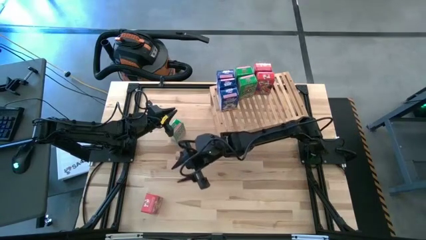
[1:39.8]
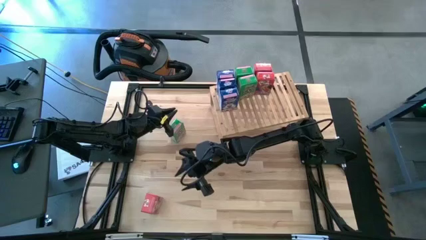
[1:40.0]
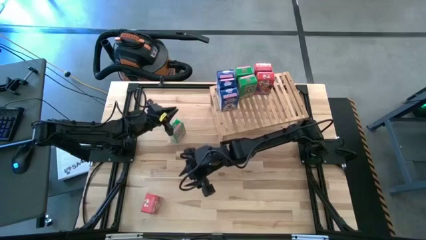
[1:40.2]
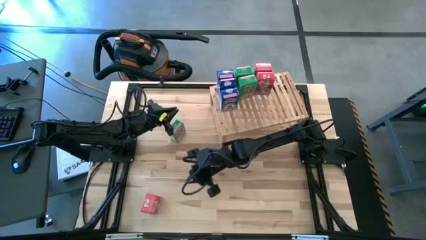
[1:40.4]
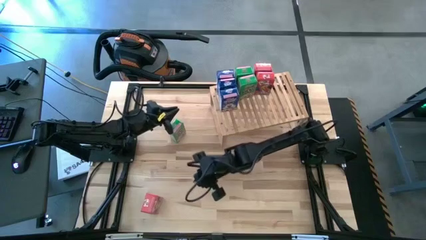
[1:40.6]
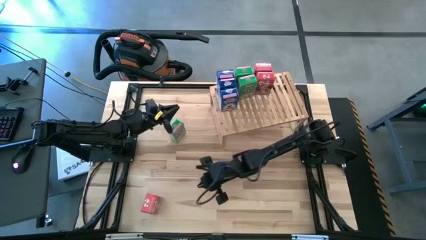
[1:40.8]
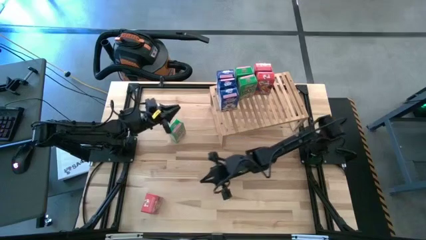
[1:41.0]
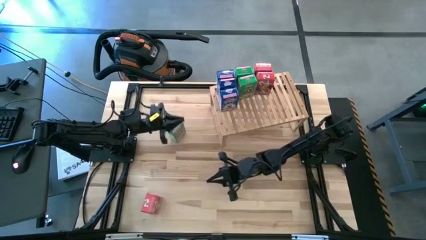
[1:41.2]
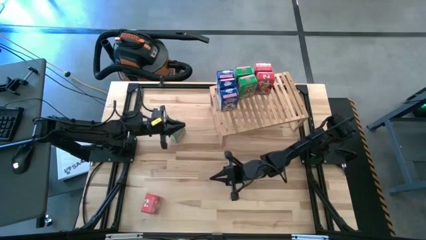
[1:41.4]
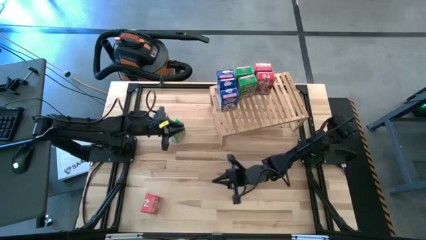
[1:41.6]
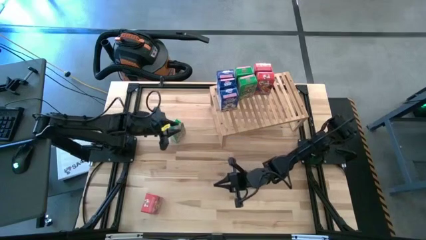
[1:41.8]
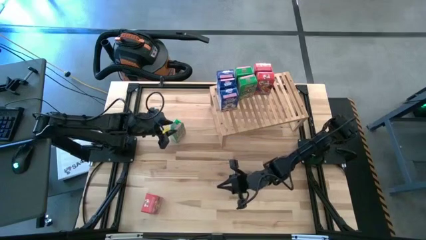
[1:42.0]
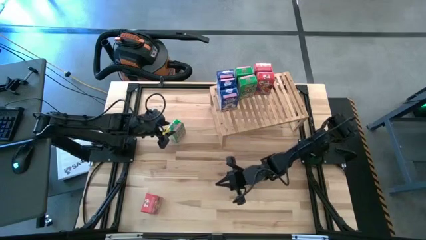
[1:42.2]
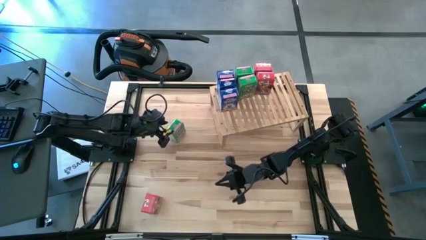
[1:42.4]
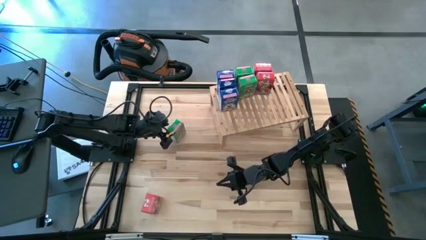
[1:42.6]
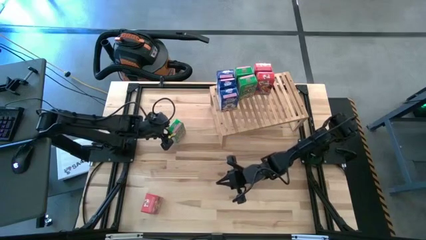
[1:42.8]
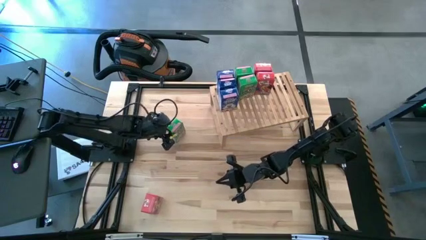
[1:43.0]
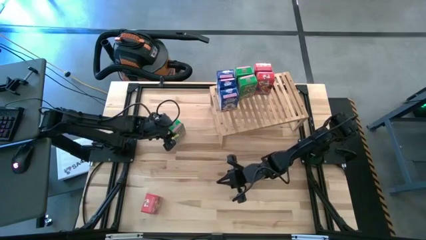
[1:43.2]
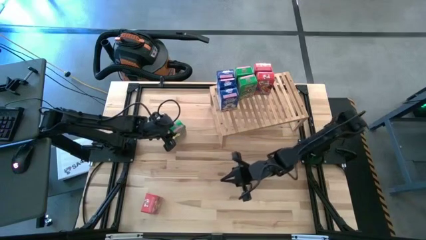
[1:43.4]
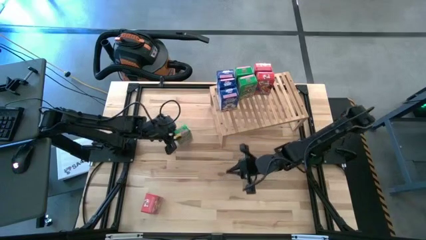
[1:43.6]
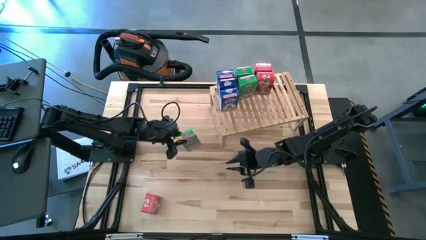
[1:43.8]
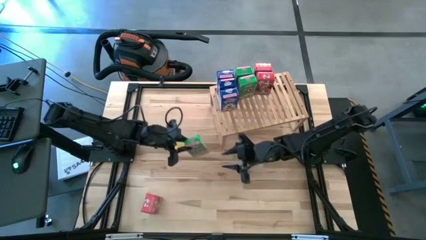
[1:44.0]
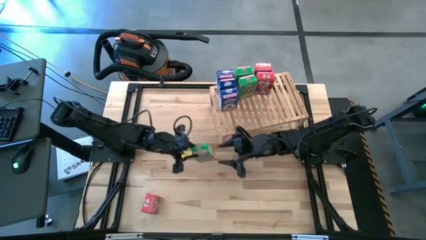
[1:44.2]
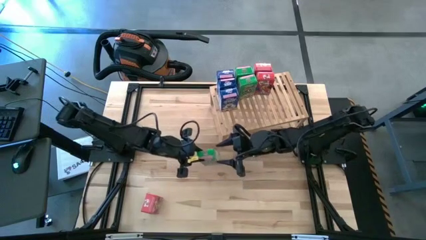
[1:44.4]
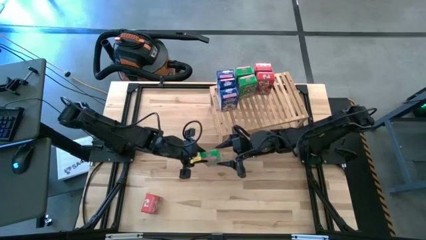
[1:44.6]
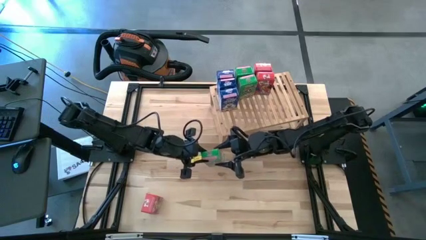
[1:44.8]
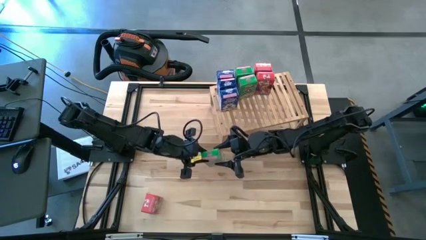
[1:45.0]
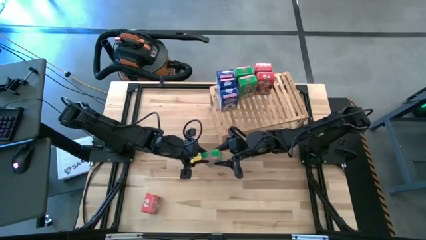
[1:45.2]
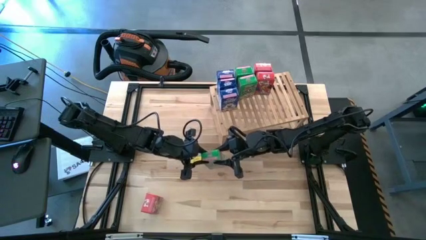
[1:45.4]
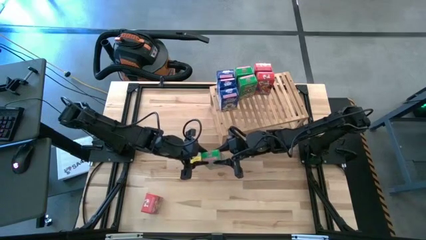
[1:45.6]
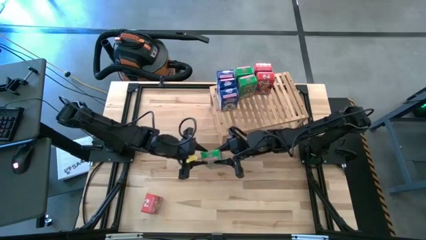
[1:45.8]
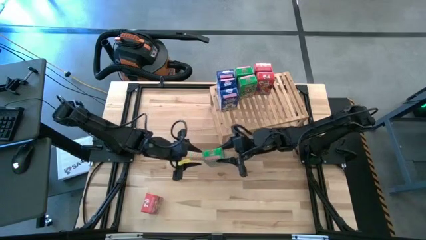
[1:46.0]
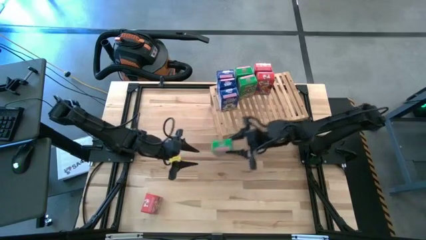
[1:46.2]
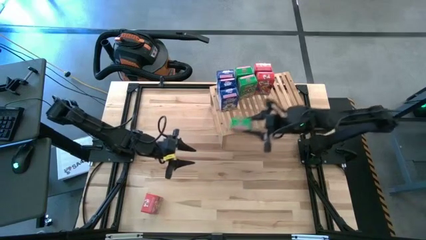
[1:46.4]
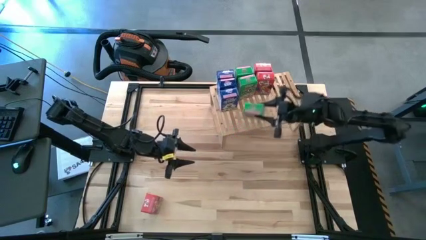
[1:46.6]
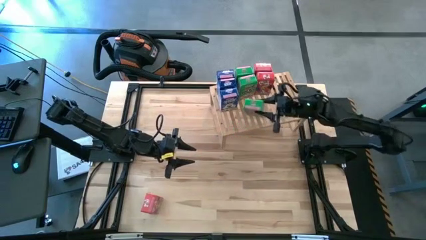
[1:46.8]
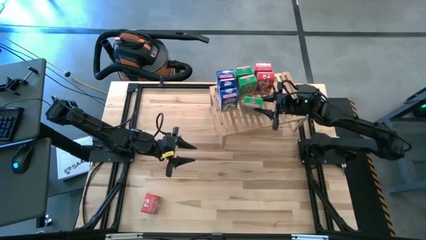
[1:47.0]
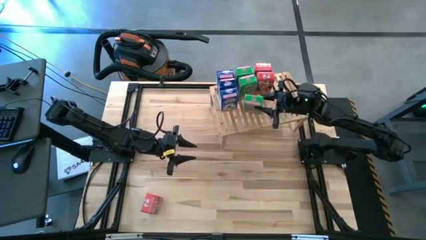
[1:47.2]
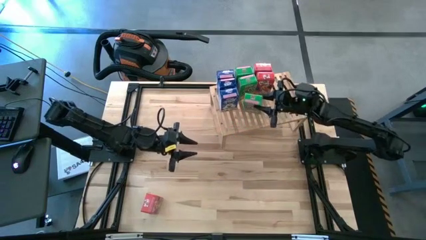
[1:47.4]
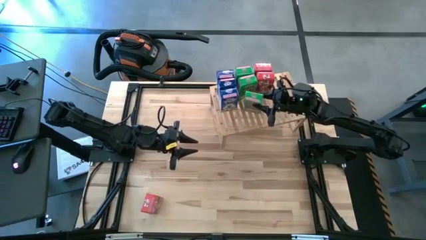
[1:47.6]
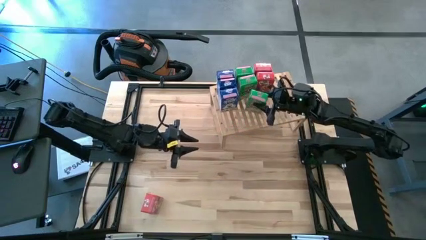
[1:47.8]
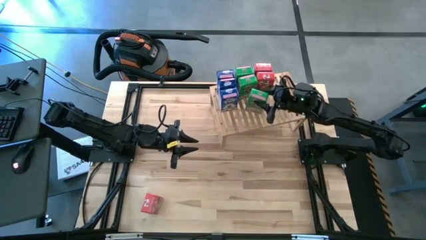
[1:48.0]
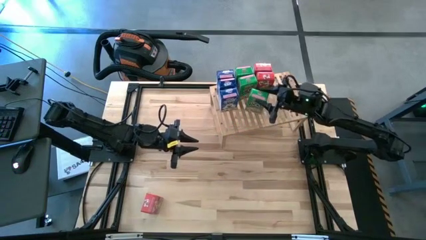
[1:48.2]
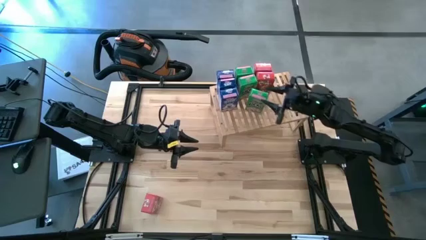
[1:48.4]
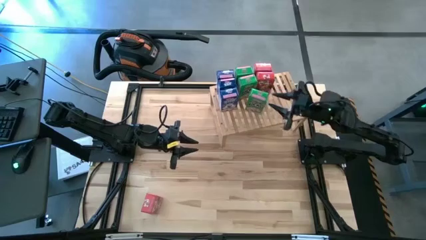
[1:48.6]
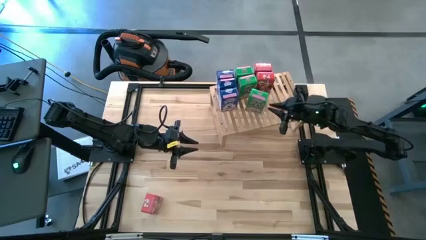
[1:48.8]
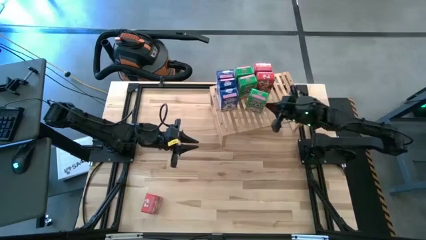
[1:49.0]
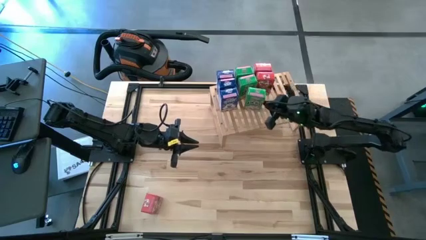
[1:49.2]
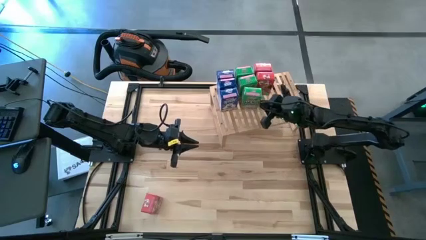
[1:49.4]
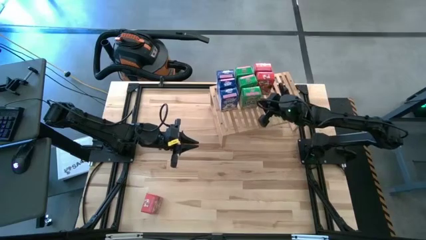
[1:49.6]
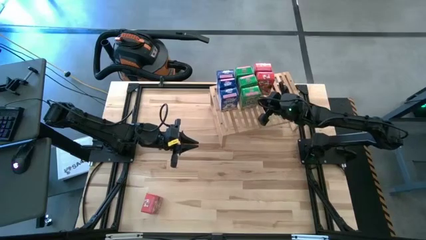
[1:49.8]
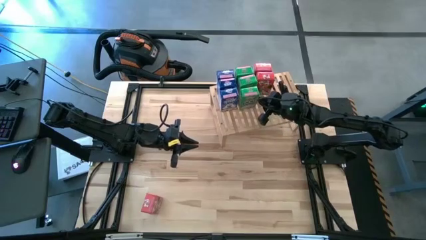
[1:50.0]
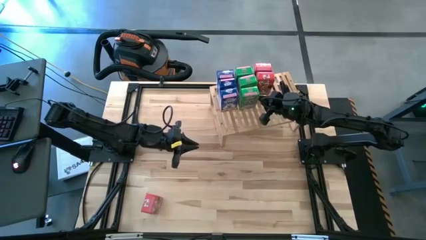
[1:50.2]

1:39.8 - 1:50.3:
Task: Stack cereal on shelf
Put the green cereal box on the shelf aligned with the other green cereal boxes

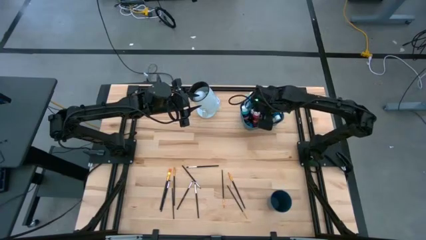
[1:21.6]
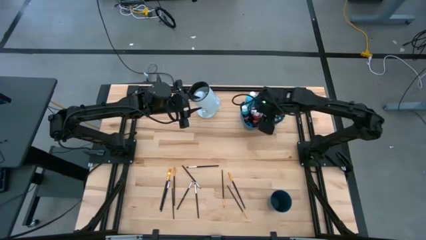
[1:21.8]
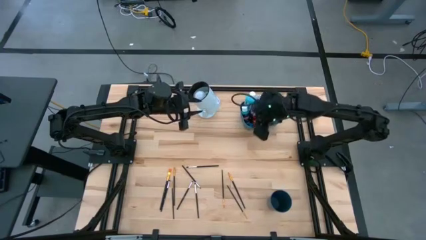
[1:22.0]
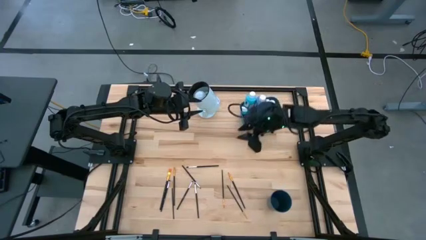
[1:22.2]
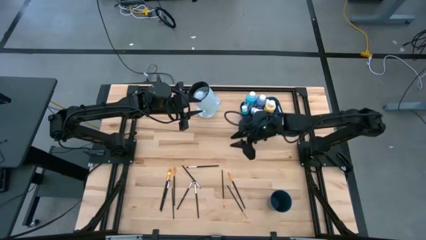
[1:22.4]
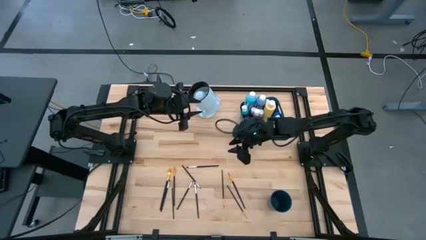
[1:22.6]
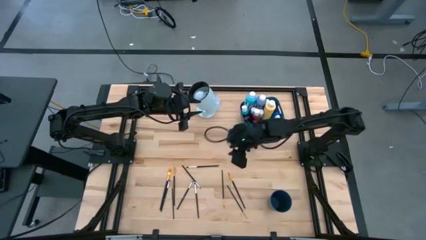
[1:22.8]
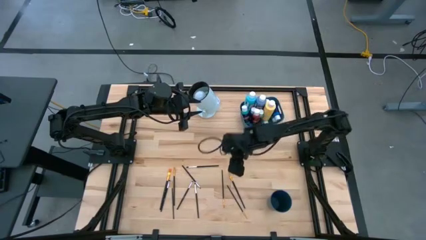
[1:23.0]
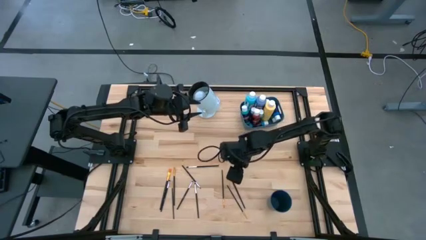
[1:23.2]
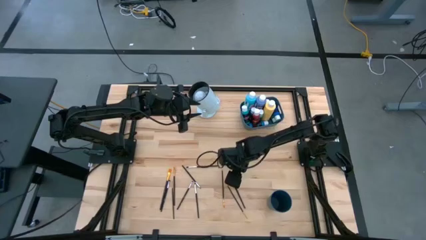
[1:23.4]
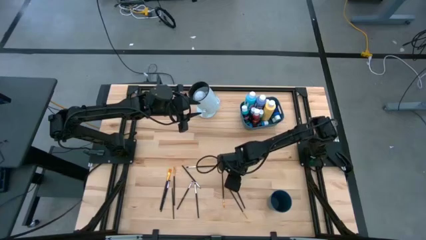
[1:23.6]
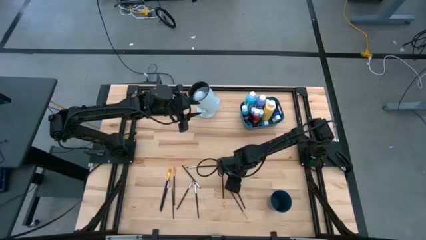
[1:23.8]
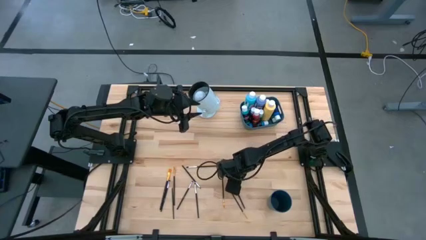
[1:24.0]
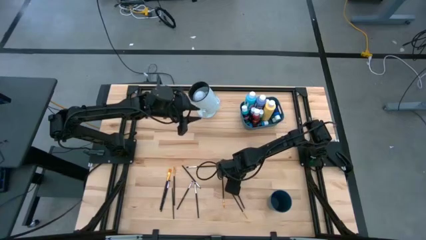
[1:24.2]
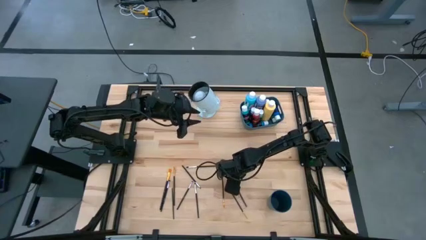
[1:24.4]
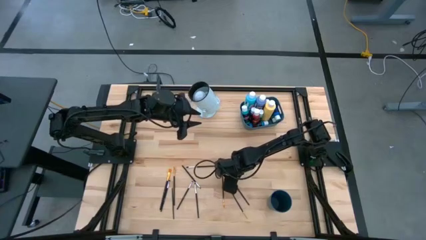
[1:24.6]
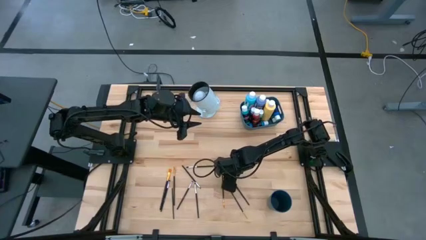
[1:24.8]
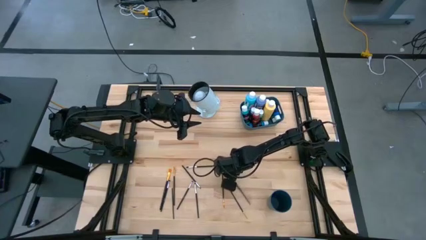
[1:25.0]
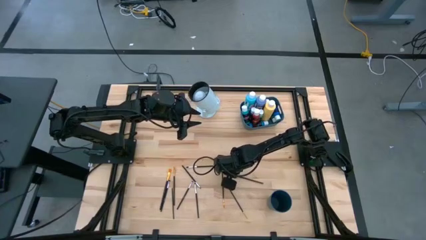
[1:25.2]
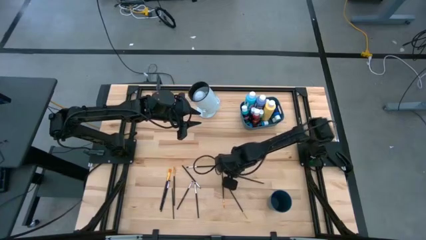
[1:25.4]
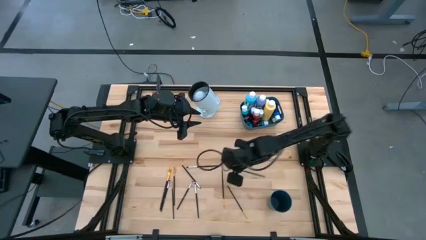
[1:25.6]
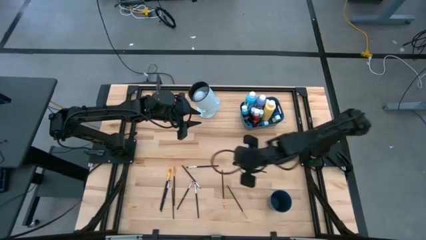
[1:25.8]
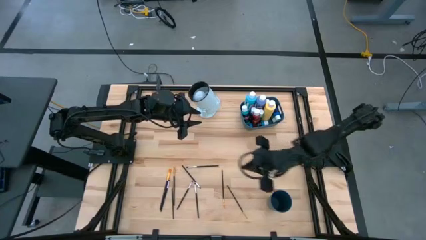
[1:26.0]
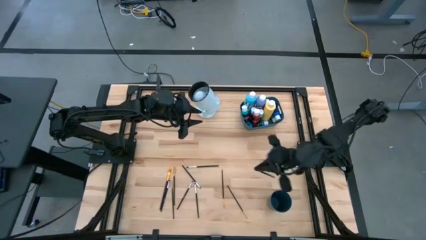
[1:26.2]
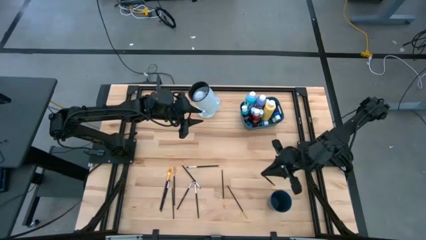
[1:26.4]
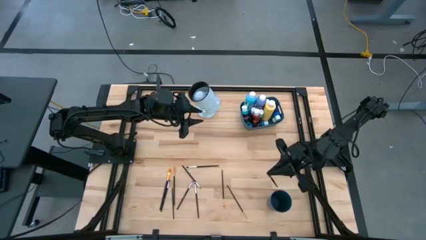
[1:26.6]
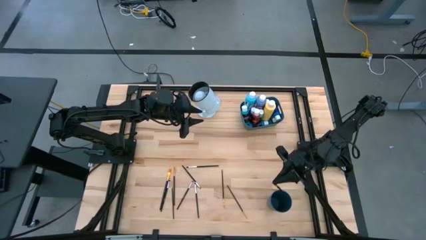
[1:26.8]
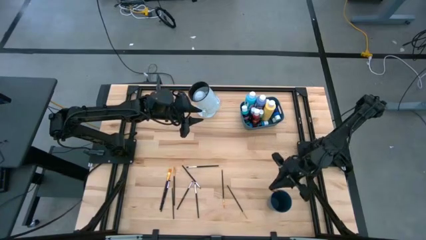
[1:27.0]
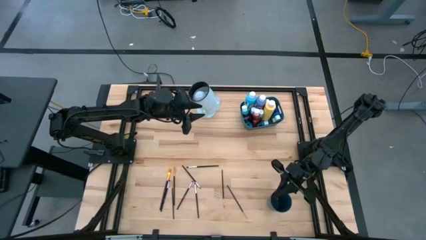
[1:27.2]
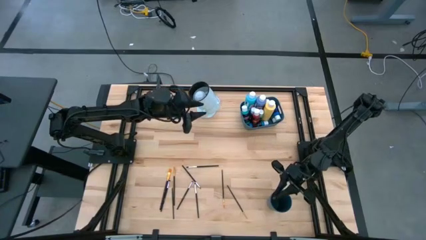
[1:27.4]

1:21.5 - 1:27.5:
Task: Pick & Place Paint Supplies
Put the gold paintbrush into the blue cup
